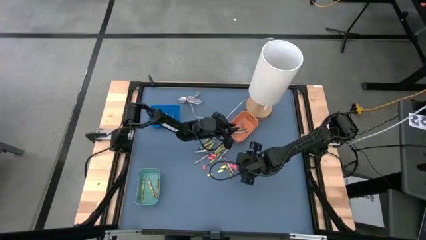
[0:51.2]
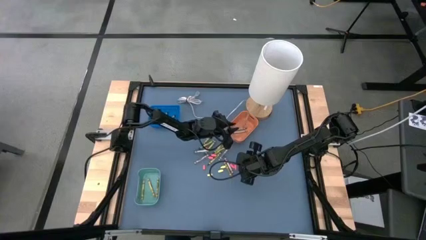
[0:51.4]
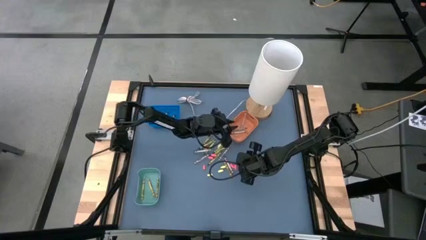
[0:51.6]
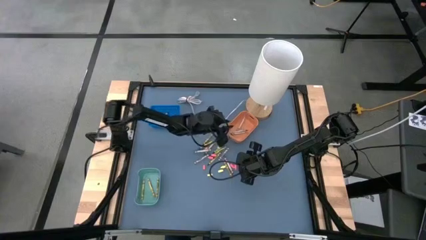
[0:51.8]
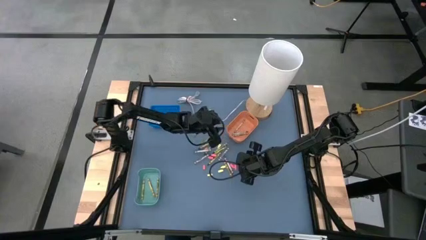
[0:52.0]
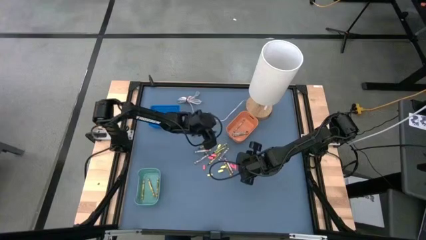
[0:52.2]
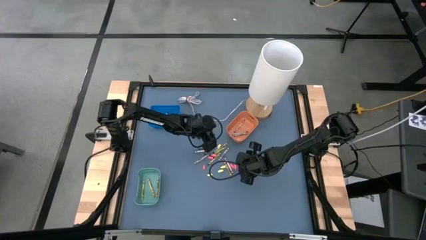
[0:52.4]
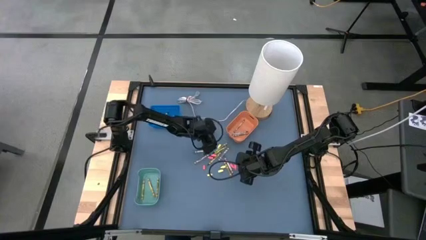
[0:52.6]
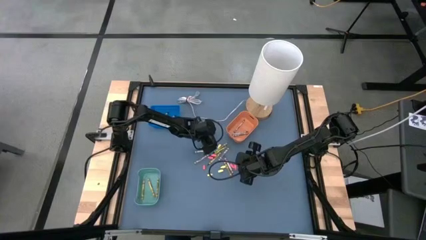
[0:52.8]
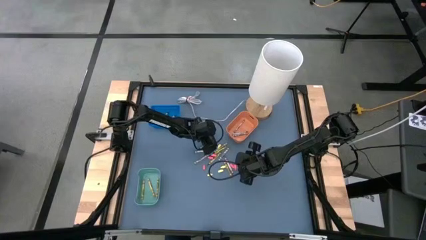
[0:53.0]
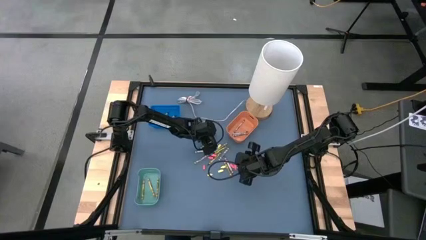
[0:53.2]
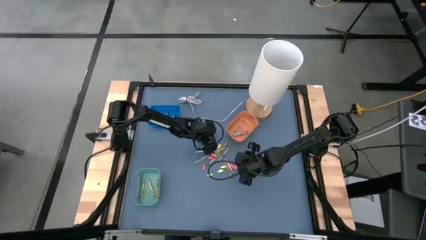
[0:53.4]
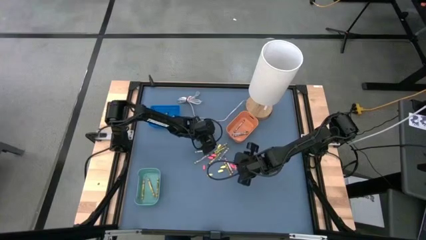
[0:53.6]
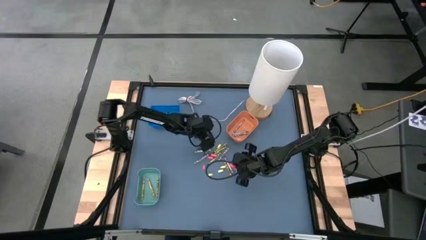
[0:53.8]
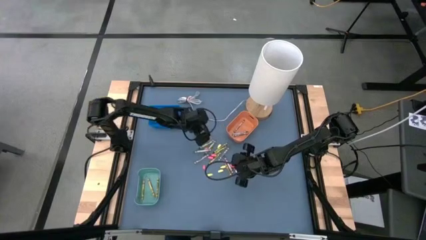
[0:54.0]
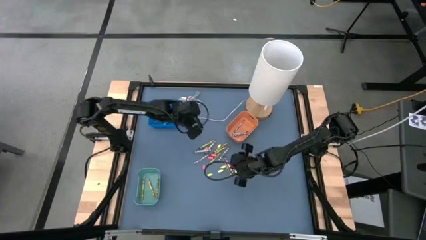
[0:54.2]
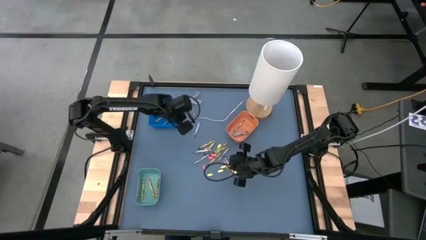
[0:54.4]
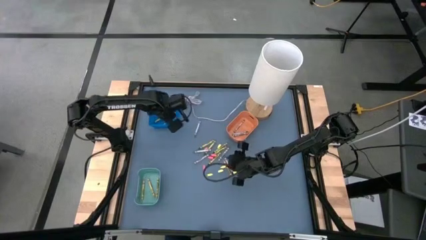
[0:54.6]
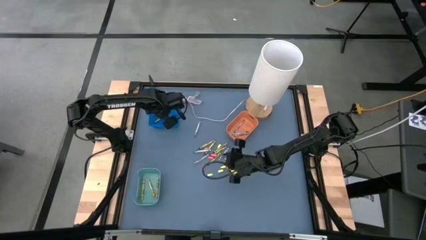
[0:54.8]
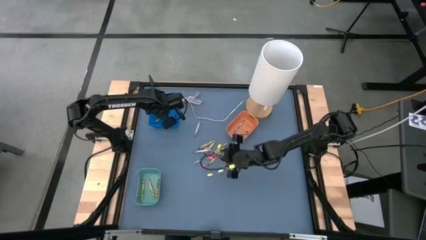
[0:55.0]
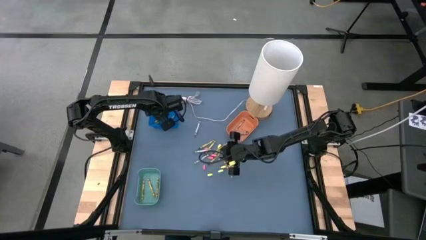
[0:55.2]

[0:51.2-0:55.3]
Task: Sort crayons
Put the green crayon into the blue bin

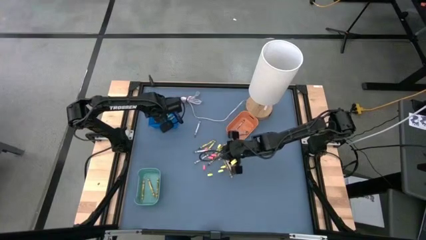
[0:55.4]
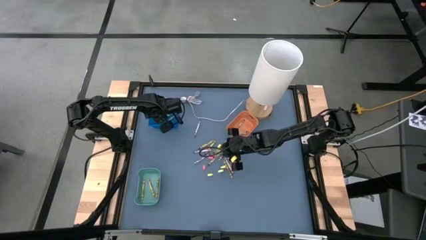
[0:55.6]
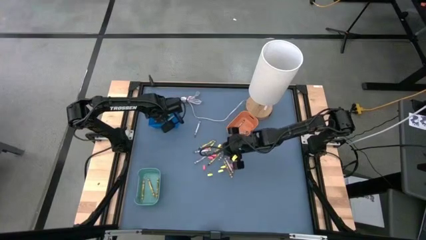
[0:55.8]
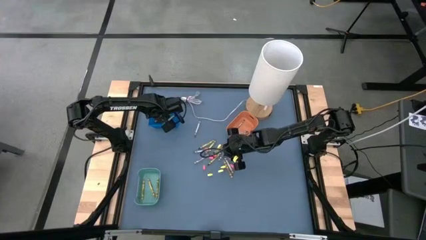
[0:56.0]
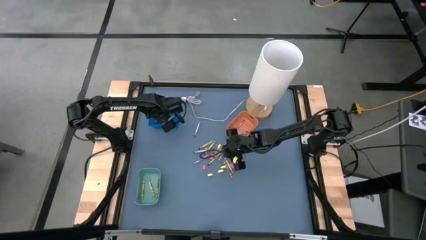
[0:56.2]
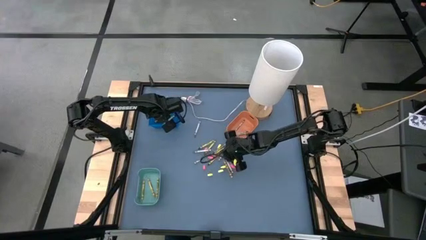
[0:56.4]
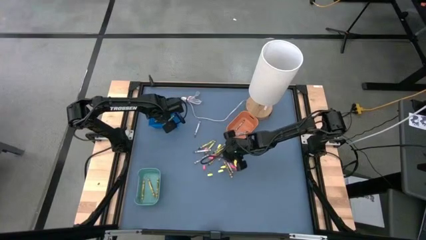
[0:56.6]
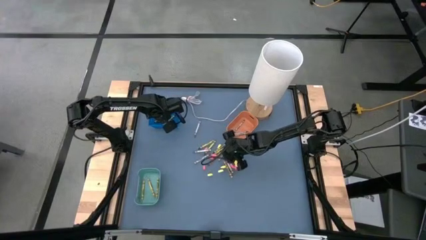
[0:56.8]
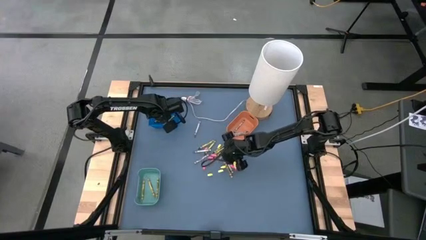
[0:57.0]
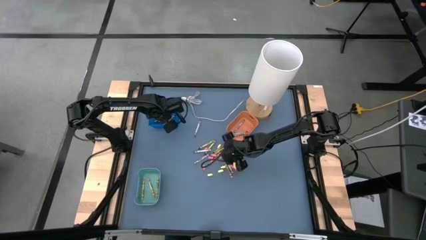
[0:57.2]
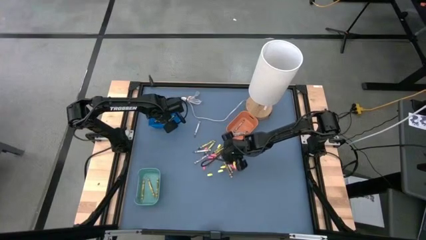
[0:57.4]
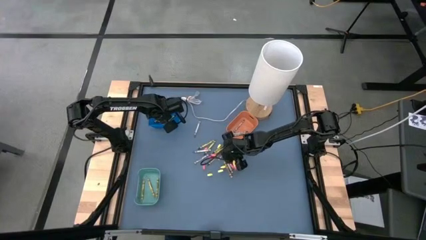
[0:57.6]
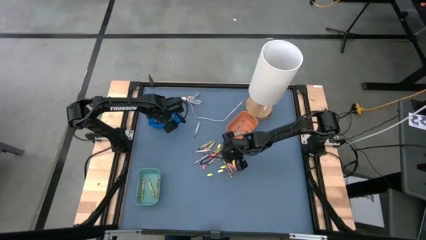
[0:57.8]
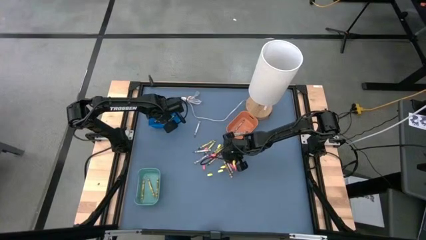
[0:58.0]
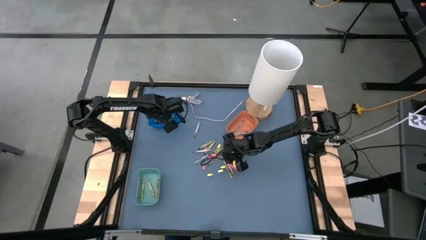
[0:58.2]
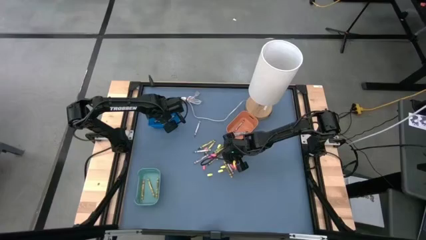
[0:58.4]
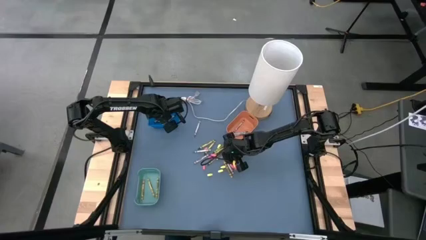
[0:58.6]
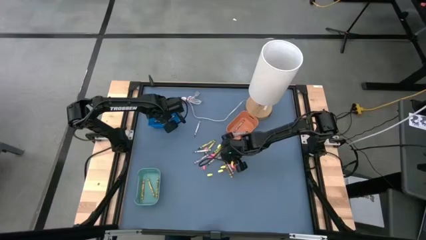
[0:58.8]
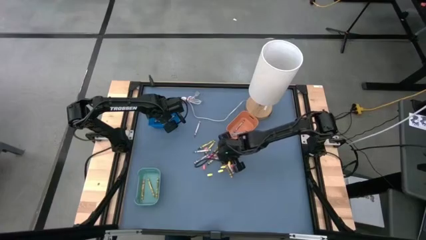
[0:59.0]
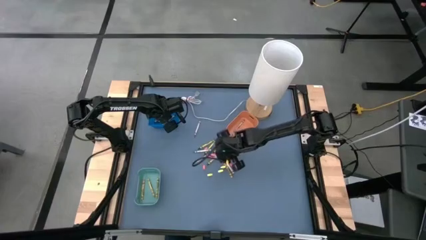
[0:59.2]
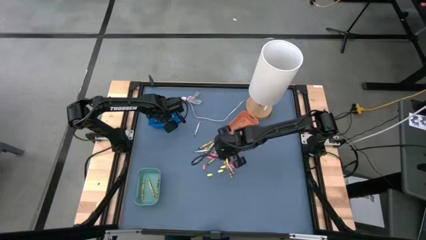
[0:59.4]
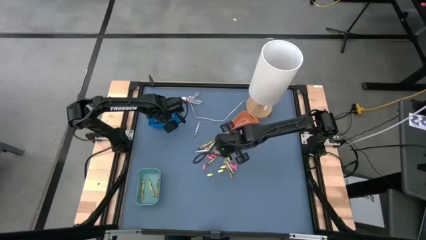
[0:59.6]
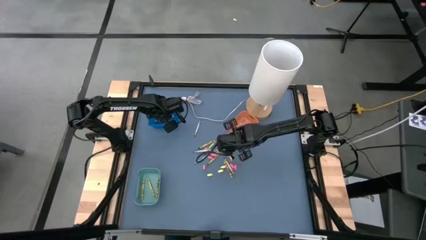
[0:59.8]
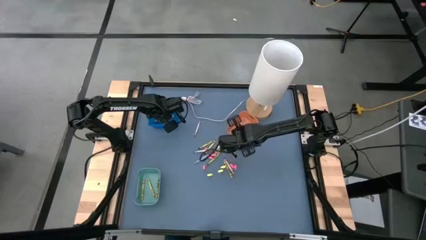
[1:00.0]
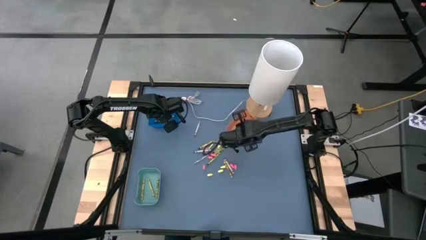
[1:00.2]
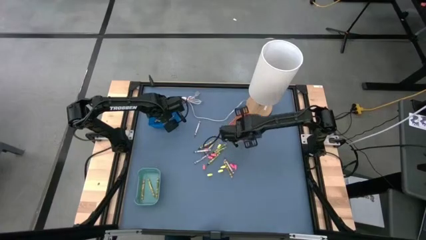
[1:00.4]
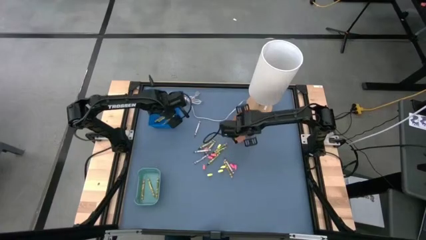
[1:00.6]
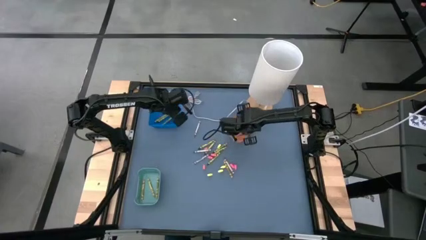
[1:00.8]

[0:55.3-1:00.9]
Put the gray crayon into the orange bin

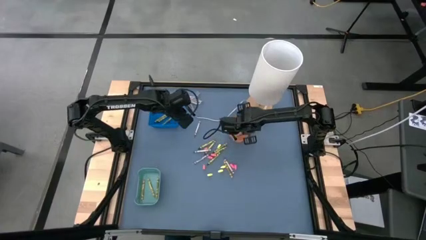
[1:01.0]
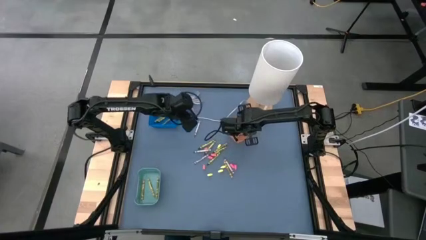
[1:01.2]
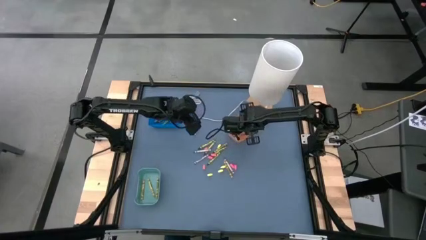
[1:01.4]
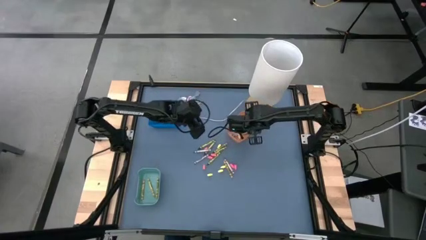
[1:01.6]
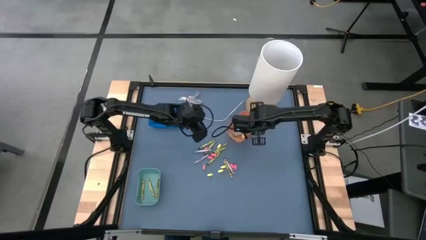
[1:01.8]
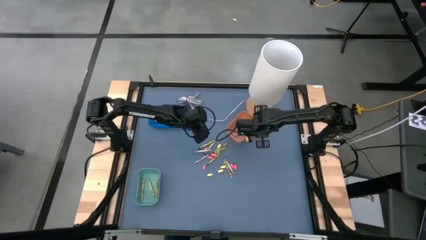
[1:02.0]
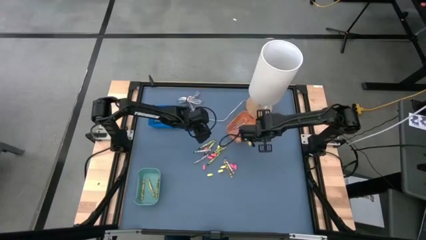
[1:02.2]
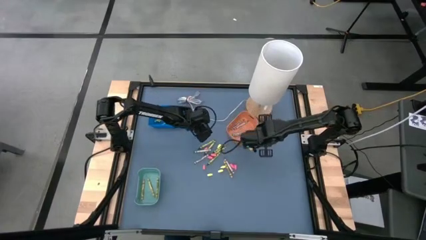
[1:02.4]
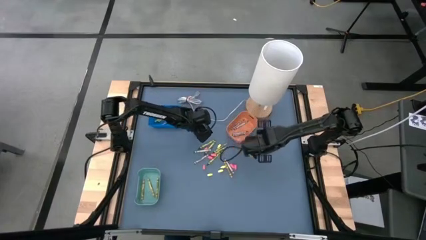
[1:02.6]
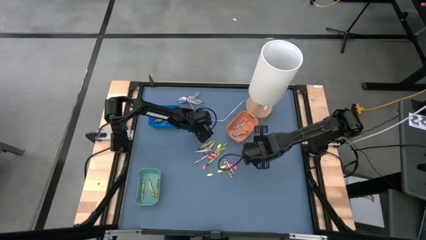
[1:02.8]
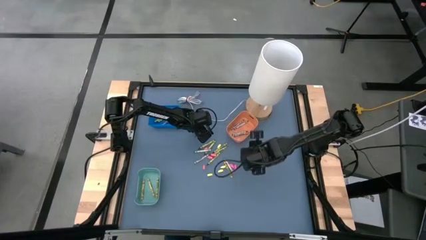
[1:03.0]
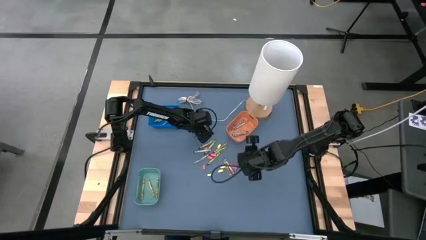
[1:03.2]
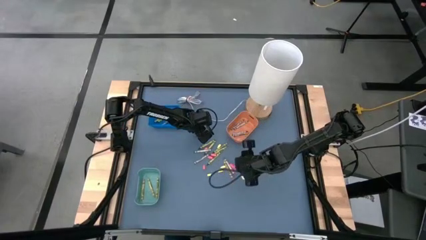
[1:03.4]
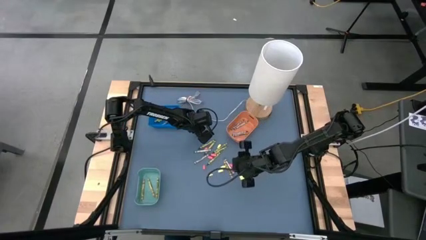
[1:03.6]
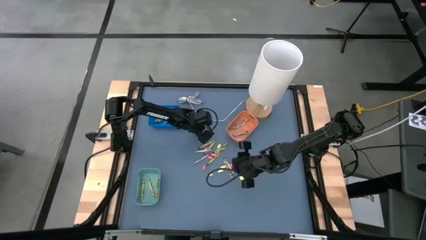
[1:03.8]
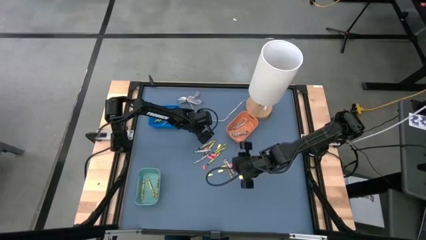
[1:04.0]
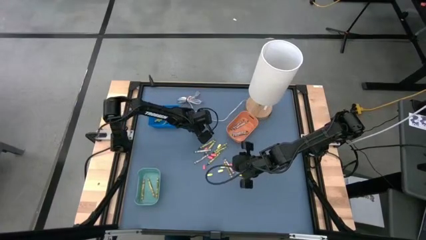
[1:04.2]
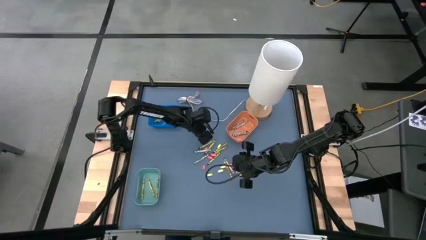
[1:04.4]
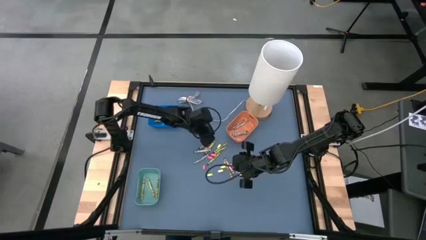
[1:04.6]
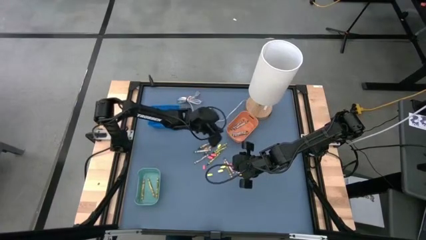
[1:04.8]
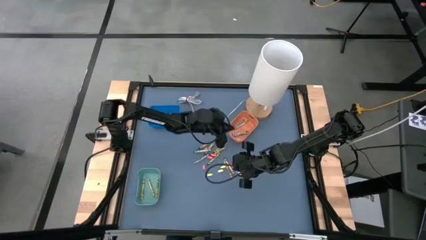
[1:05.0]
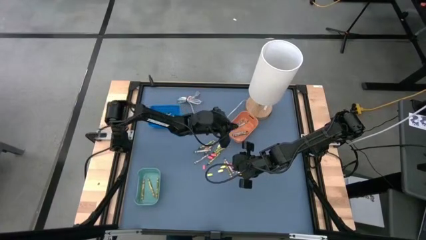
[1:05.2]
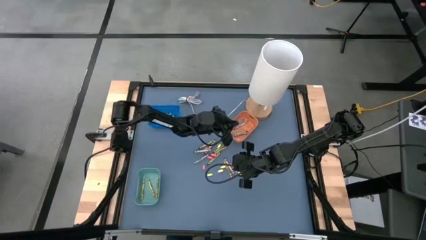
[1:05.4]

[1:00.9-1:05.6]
Put the gray crayon into the orange bin
